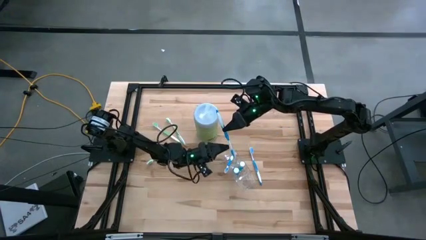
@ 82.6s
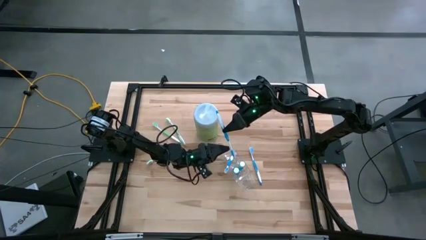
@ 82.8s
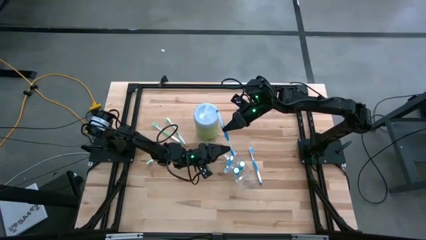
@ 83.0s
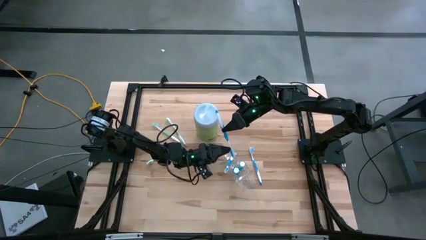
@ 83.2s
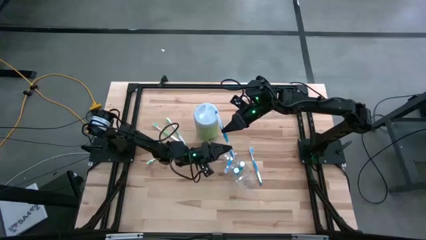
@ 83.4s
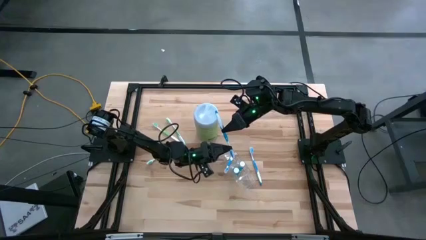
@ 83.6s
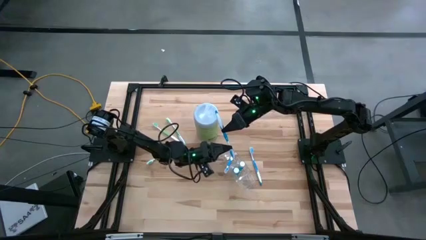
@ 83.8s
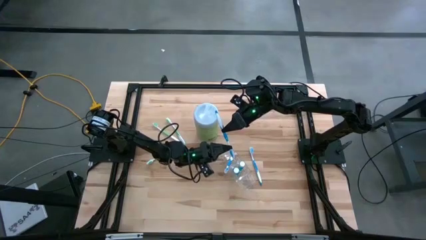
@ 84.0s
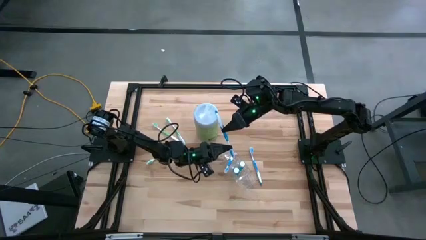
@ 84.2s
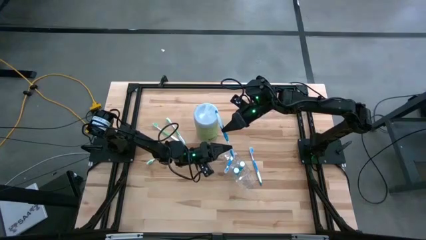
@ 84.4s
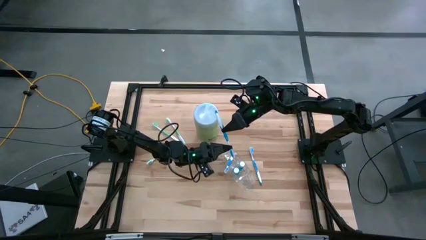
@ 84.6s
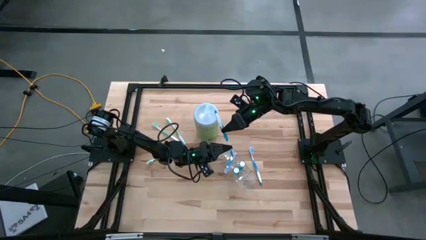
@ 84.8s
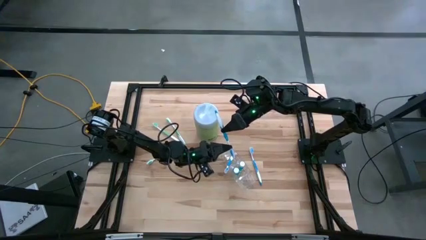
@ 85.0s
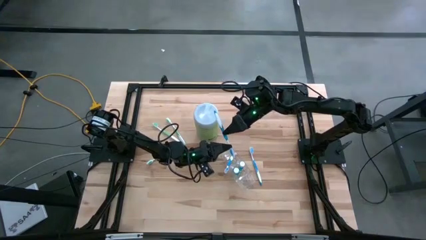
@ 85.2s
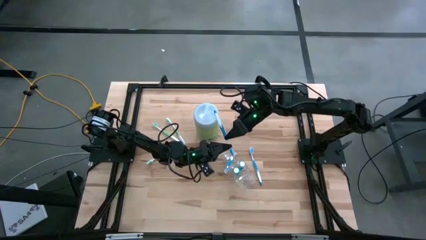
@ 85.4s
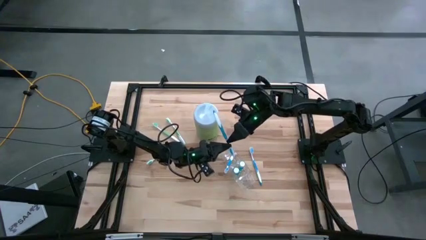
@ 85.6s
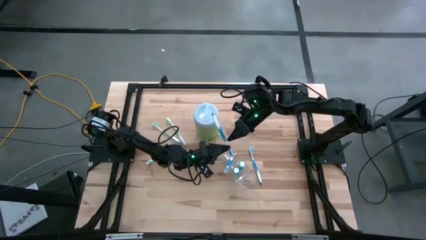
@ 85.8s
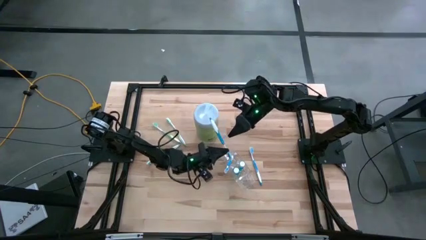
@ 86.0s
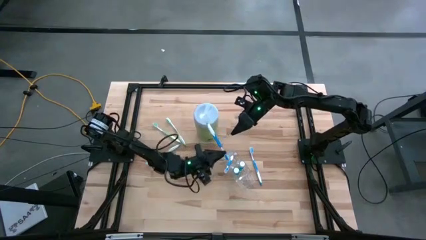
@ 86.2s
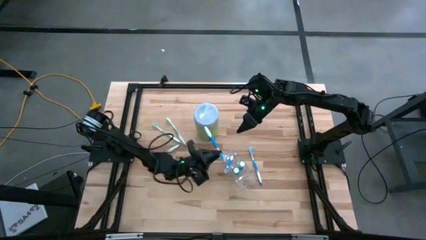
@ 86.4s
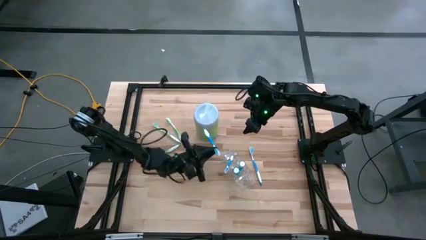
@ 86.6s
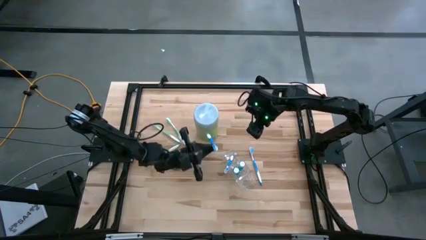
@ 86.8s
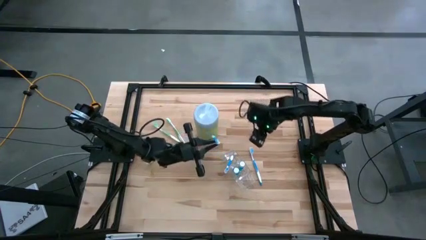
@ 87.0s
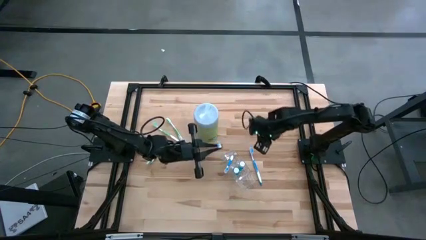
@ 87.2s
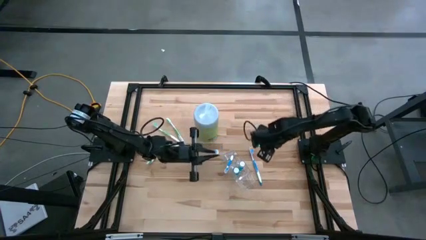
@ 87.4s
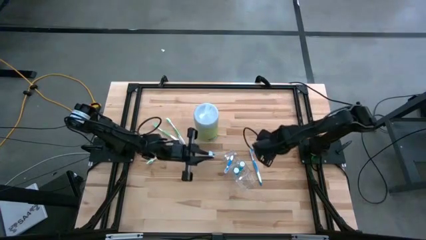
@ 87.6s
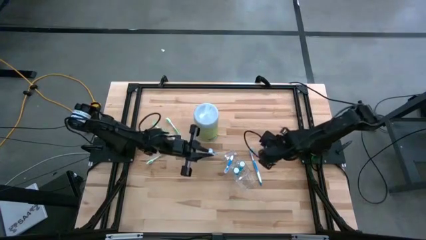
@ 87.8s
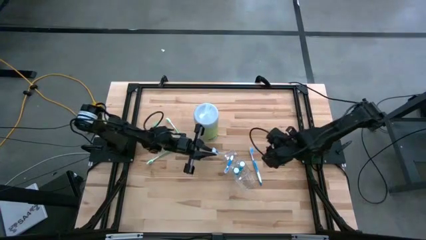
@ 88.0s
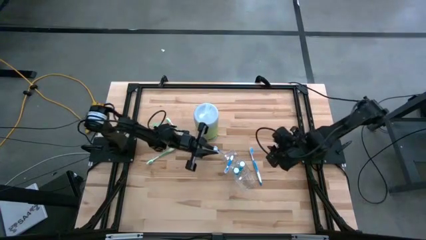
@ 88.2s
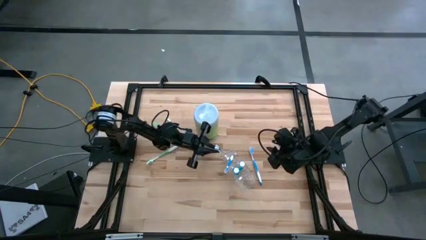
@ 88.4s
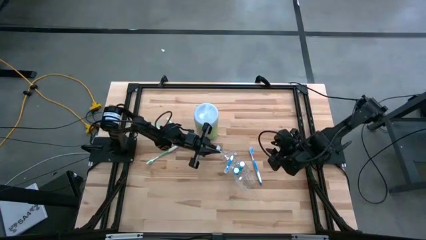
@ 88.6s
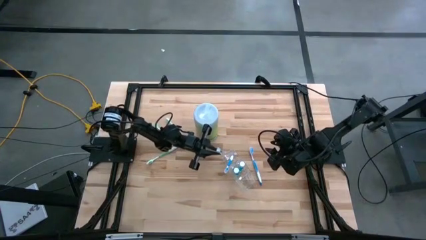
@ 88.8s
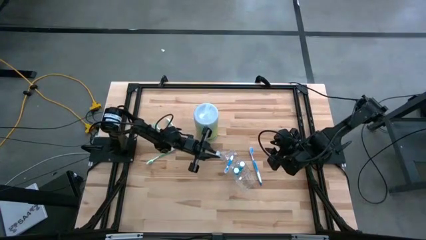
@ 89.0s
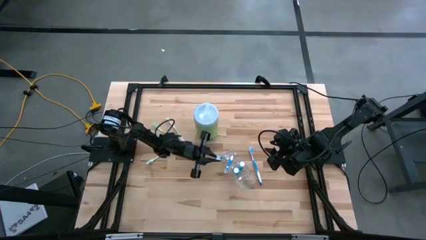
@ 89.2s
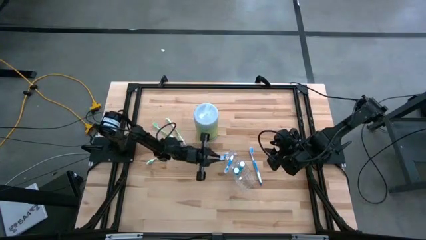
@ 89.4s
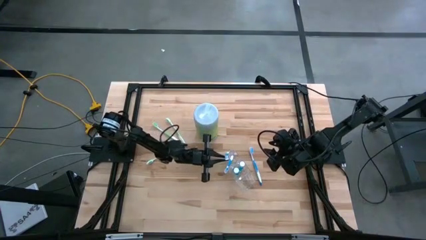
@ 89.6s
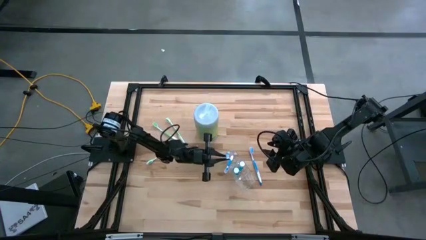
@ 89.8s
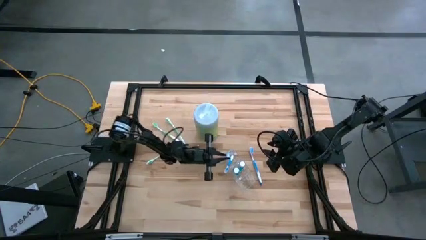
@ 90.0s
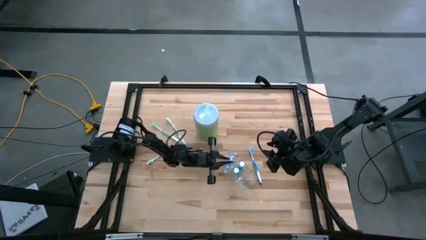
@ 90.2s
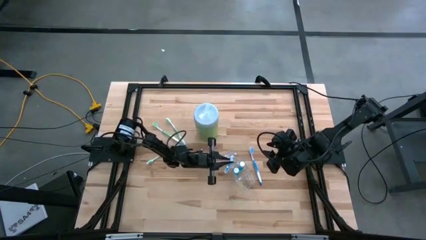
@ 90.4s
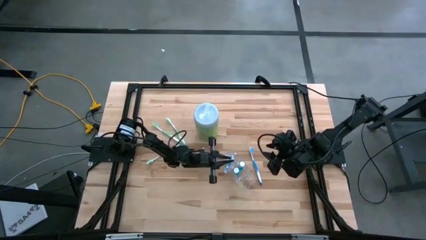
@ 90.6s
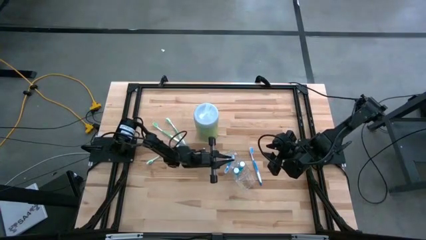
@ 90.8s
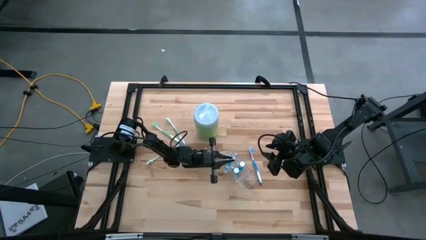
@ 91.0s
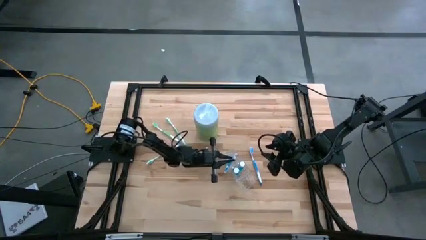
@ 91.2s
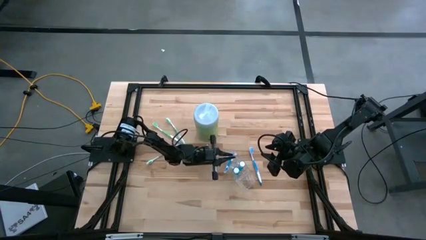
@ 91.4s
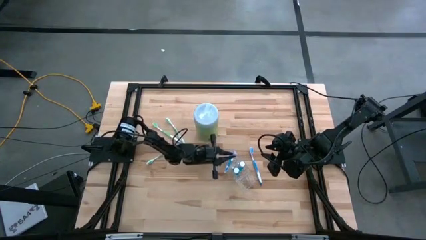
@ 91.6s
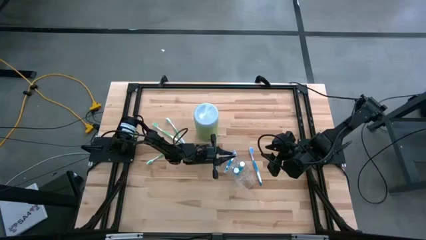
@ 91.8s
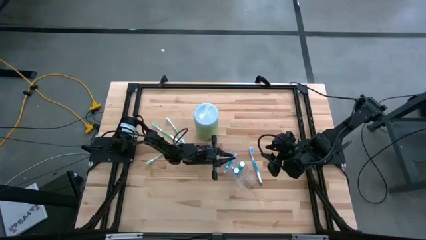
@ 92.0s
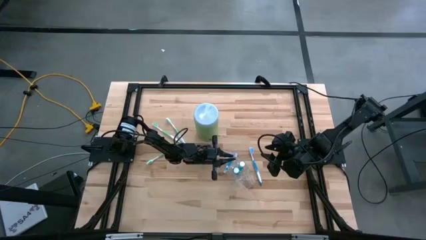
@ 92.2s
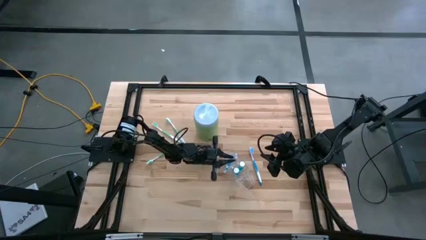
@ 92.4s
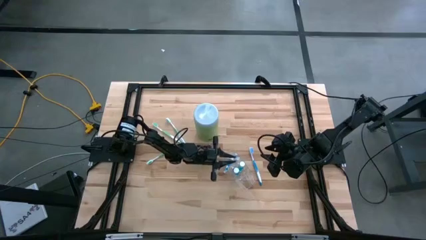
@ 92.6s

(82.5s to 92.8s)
Task: Pick & Place toothbrushing station
Put the top blue toothbrush into the transparent organizer

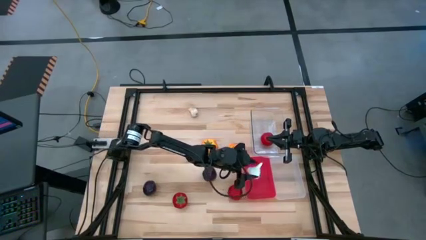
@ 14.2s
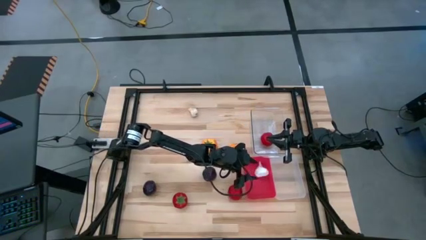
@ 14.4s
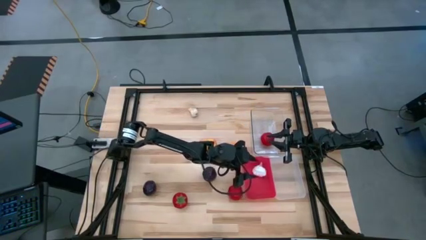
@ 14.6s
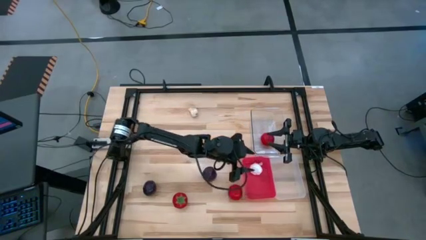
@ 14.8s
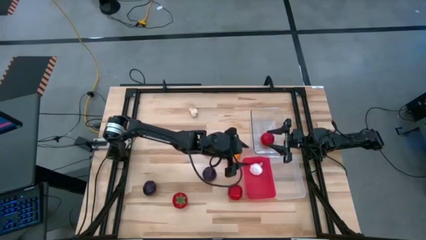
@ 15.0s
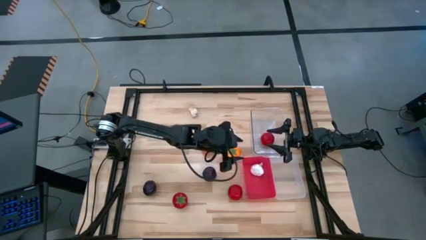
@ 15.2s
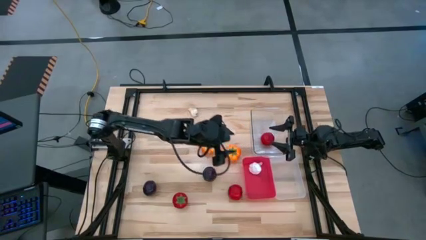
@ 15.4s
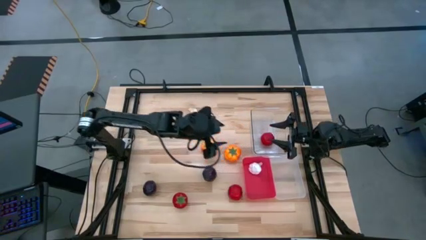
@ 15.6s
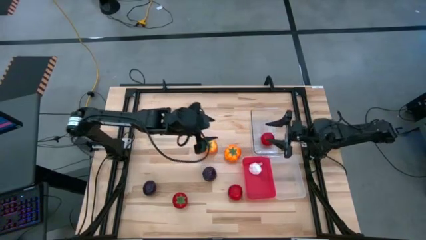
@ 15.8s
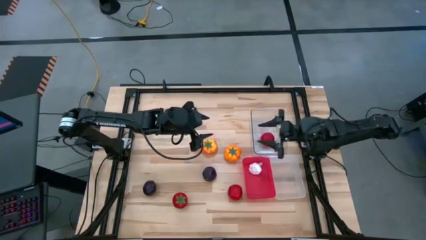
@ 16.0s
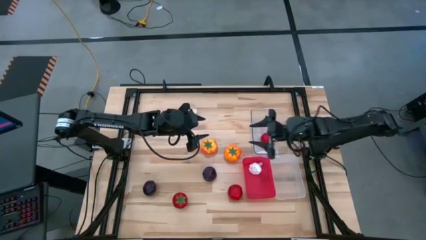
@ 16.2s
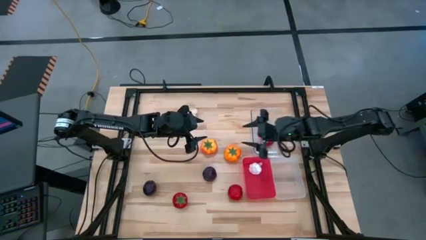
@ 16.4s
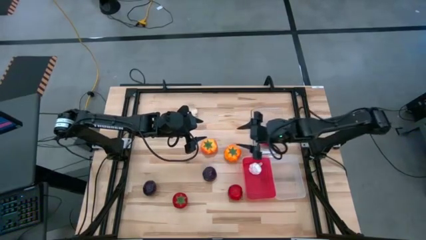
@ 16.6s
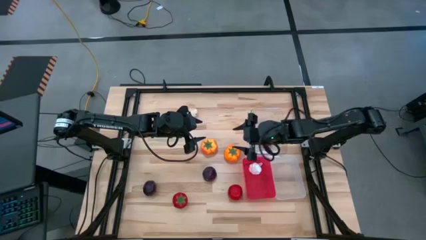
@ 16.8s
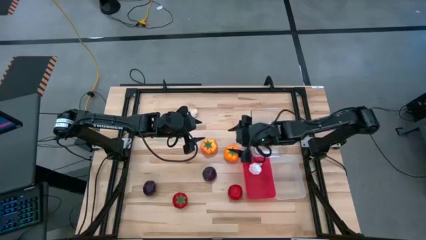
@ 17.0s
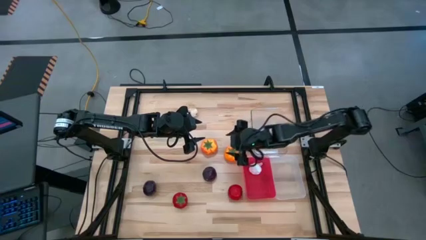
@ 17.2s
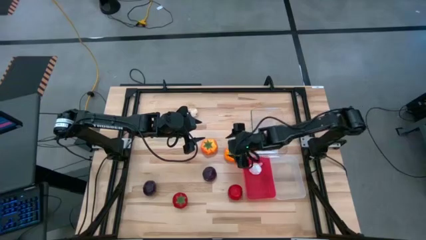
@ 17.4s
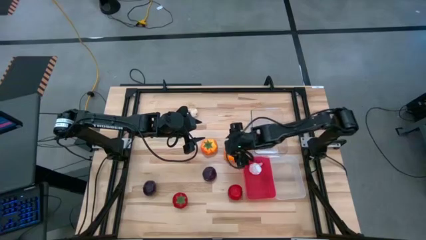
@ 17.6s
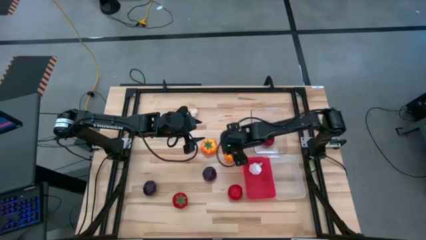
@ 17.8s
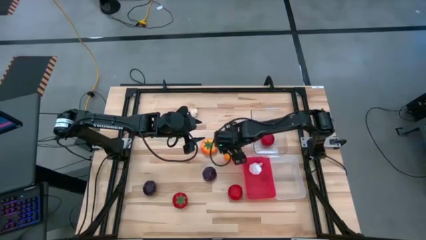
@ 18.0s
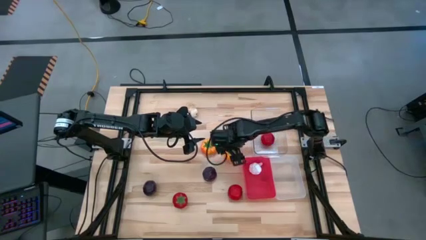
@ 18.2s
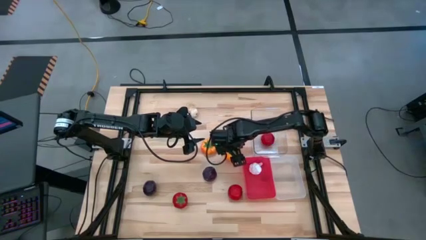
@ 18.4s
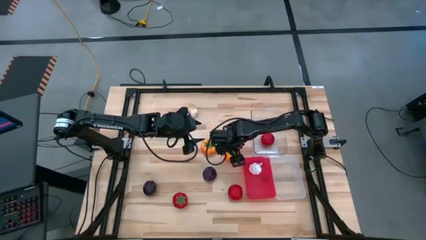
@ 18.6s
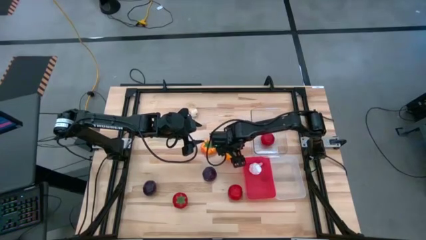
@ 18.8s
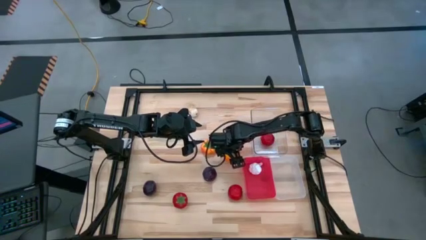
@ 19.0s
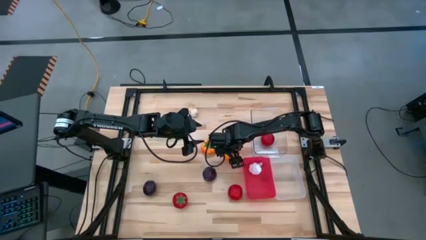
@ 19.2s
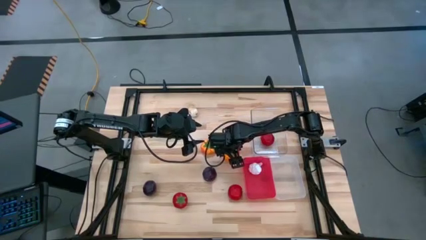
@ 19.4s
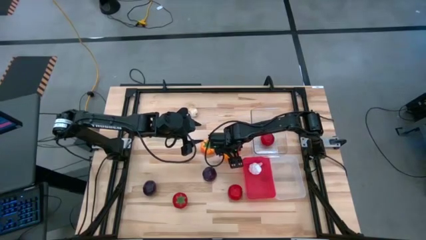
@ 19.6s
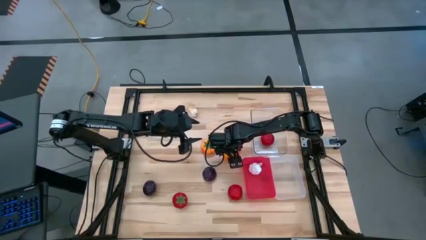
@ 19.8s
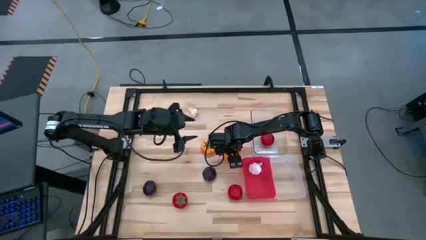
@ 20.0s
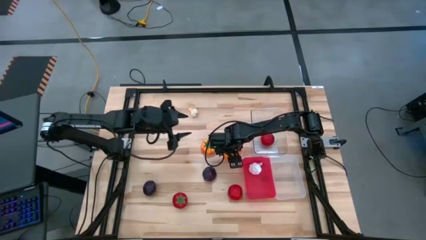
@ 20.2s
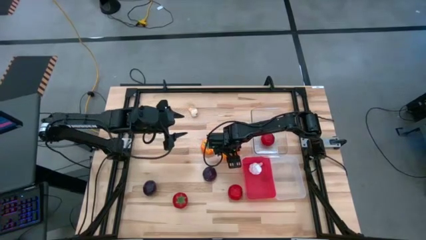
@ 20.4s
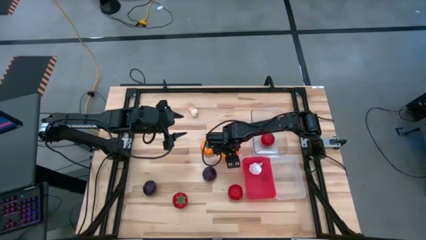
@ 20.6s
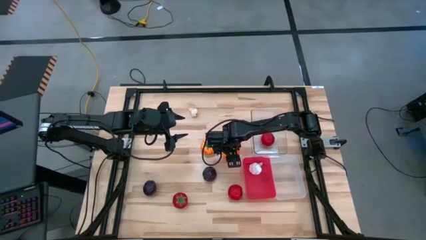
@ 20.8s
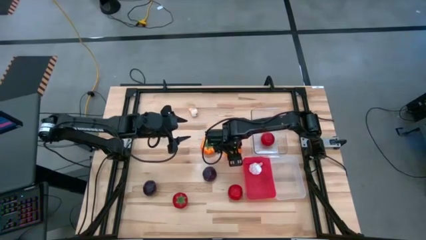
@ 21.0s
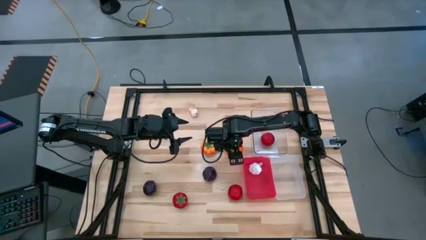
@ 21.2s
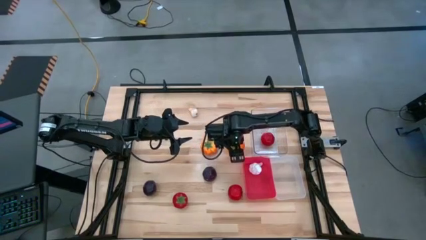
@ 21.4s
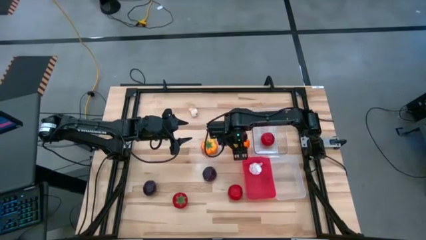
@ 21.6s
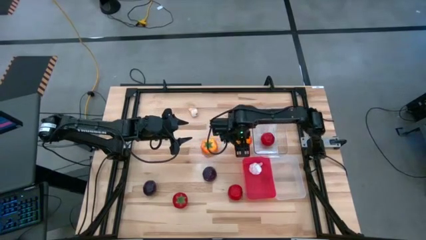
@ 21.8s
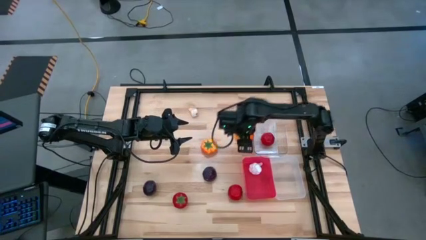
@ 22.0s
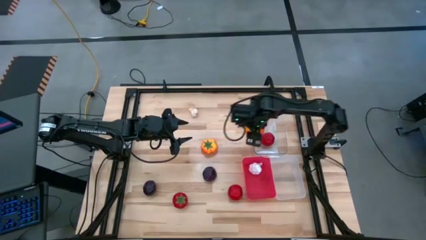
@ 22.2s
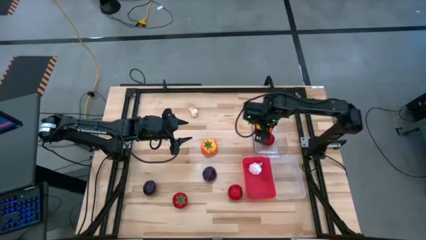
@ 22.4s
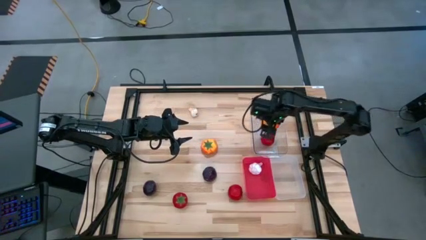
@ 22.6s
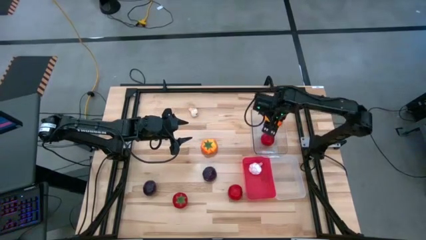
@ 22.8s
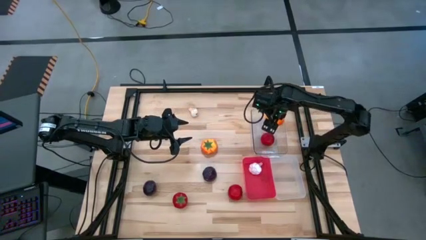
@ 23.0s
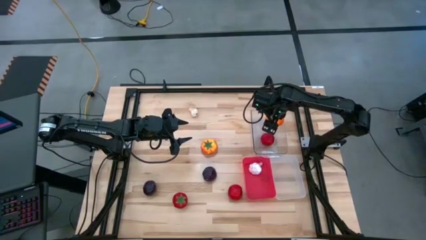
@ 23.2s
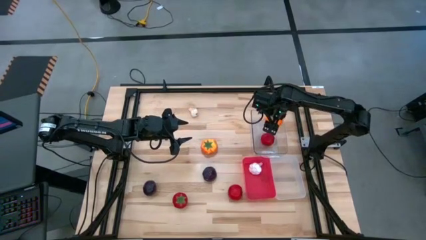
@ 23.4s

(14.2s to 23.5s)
Task: Sort produce into baskets
Put the right yellow tomato into the top transparent bin
